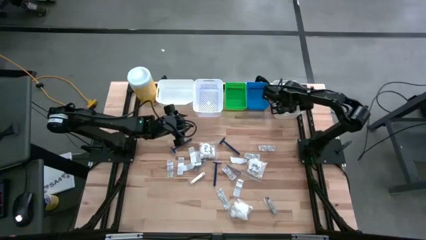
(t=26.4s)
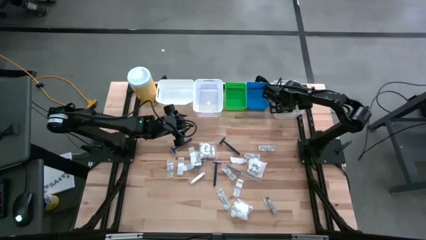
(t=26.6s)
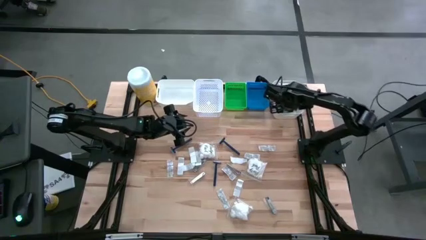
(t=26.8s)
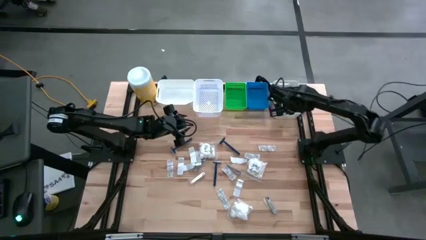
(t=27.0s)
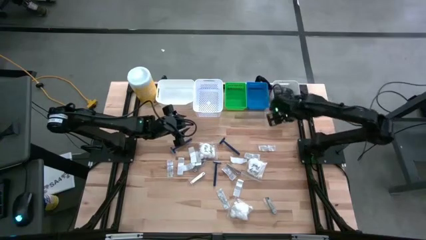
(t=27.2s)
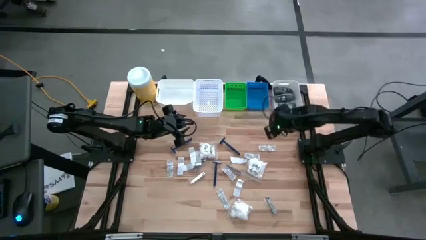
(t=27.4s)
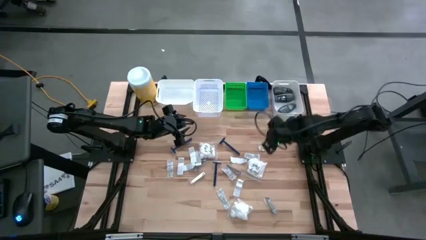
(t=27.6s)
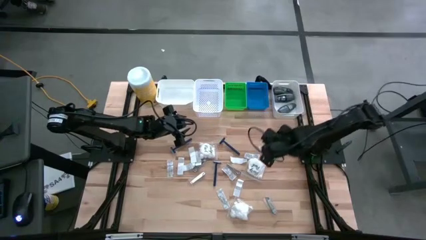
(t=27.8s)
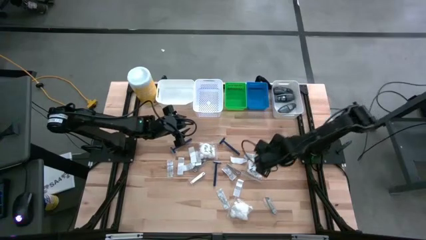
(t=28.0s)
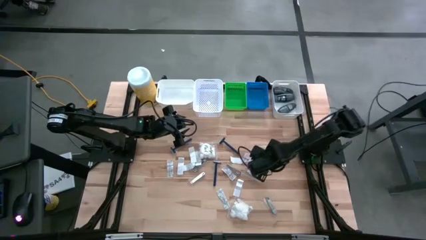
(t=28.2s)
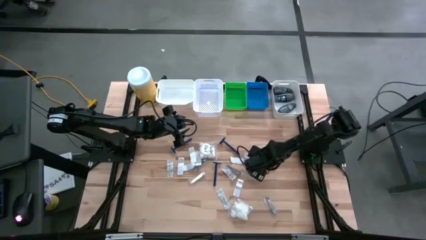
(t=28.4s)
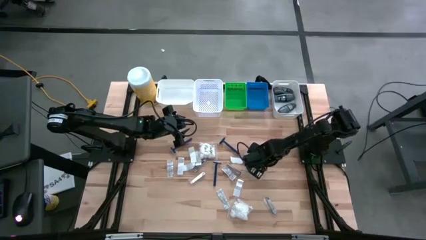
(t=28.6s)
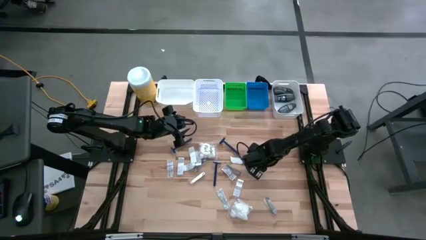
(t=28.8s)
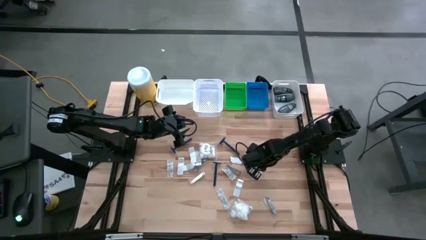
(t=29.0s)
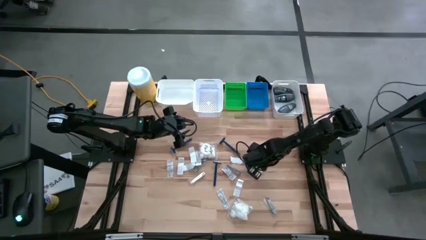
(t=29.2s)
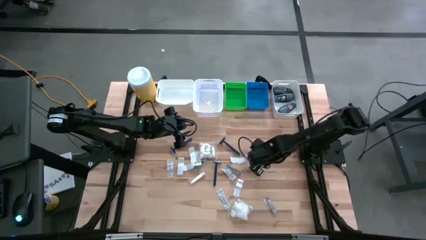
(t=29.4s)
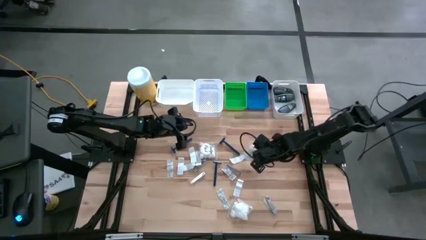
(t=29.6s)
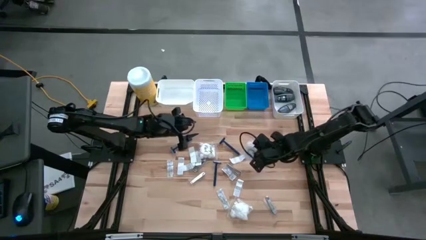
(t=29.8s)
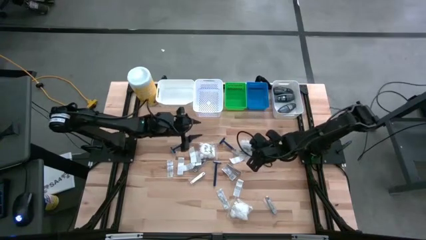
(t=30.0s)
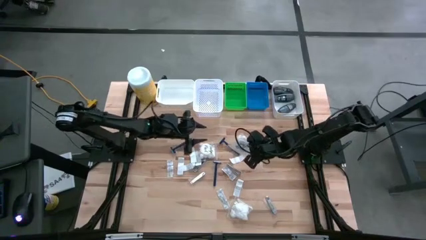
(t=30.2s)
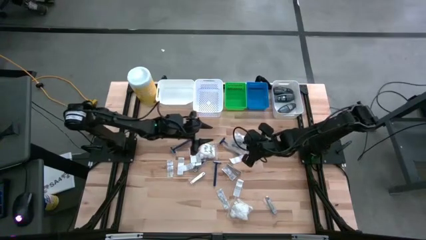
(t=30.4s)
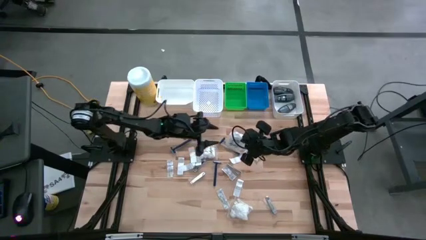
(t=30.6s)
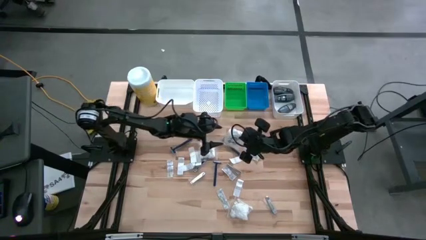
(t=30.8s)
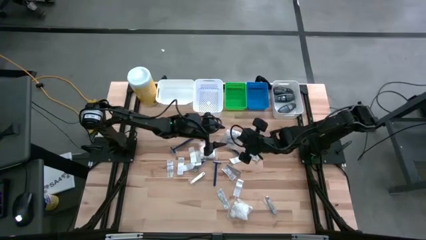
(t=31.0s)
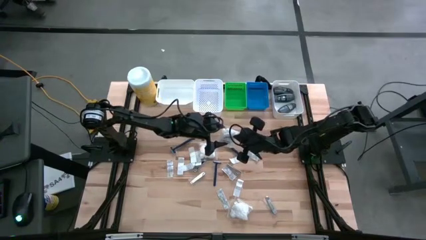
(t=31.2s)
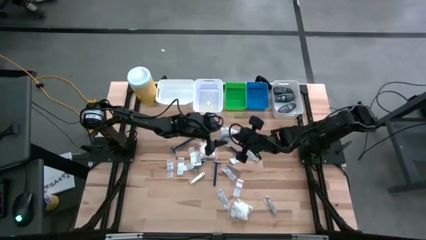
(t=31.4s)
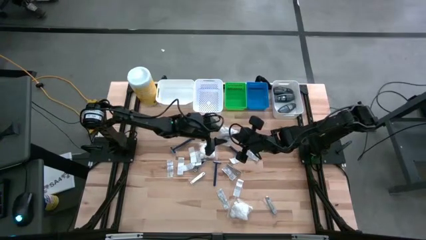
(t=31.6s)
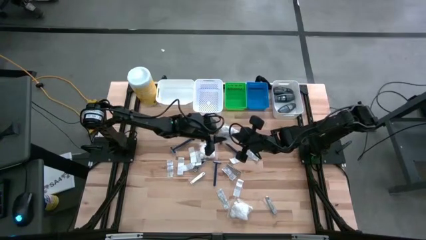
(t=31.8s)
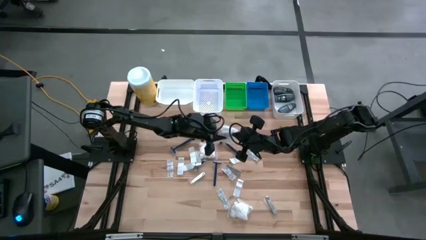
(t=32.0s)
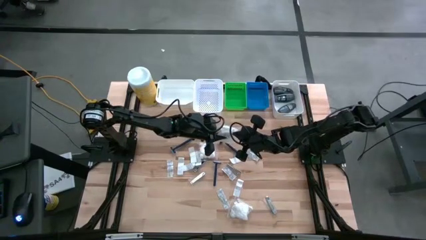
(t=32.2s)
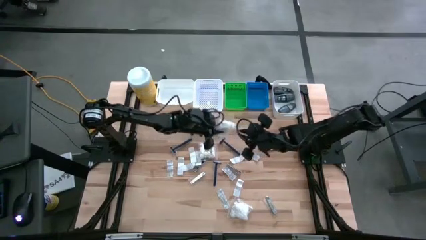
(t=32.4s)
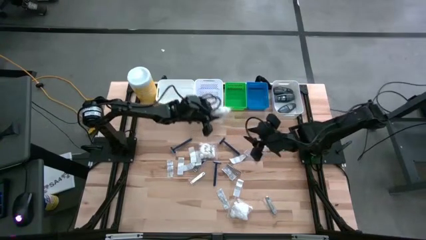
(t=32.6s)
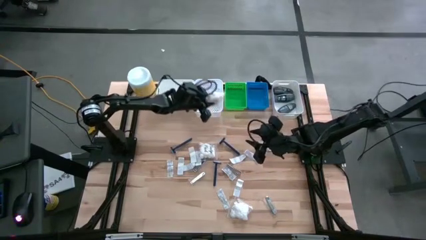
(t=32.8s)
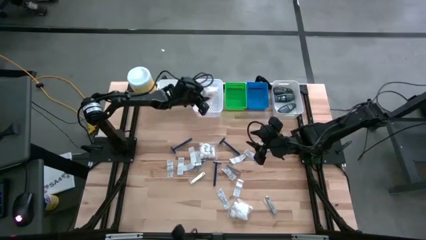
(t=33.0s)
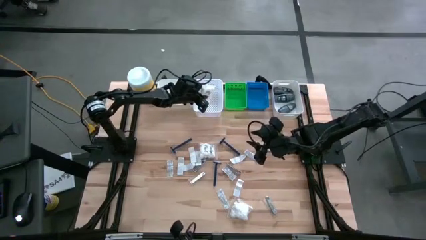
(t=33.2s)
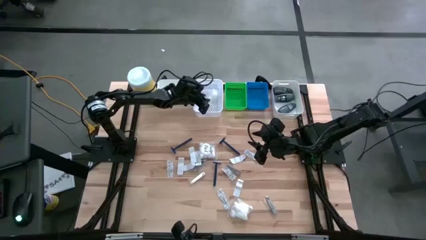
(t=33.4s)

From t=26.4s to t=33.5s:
Task: Pick & Place Travel size toiletries
Put the white cotton pack into the middle white bin

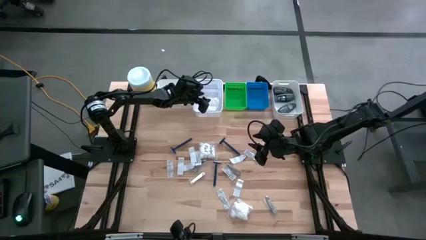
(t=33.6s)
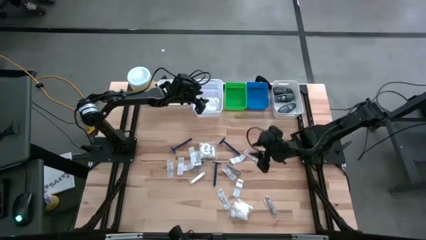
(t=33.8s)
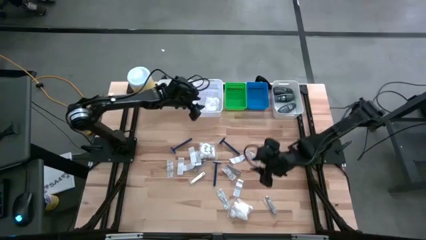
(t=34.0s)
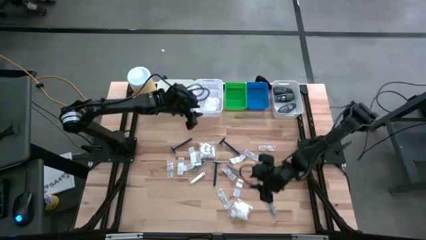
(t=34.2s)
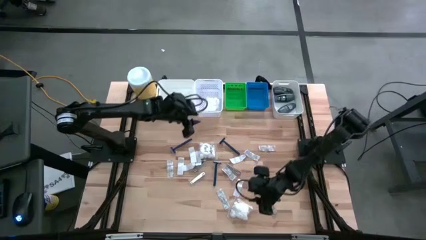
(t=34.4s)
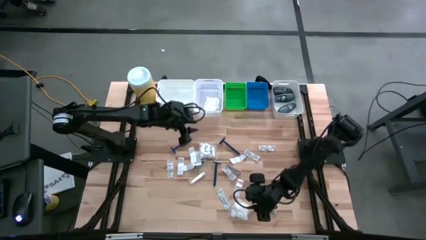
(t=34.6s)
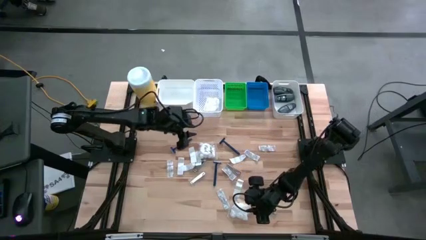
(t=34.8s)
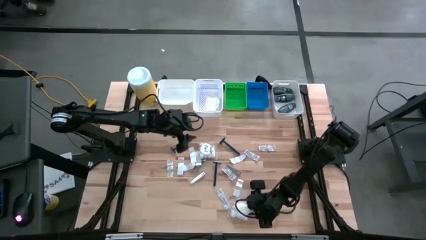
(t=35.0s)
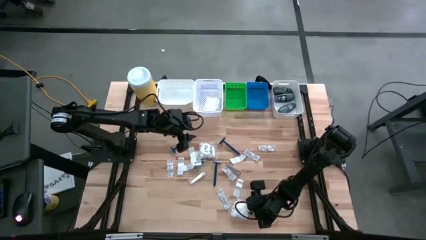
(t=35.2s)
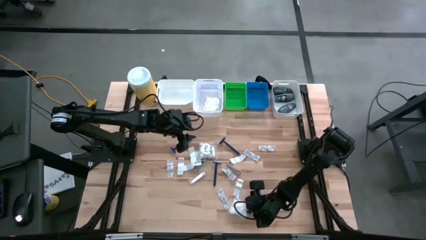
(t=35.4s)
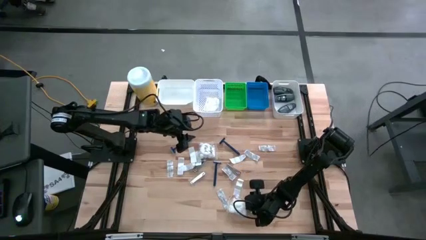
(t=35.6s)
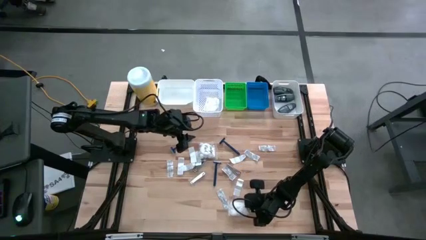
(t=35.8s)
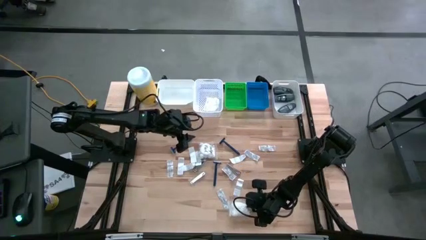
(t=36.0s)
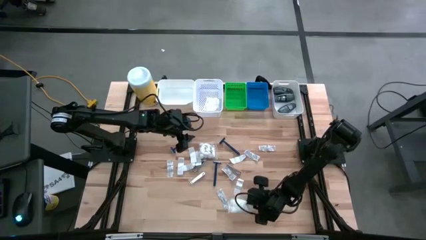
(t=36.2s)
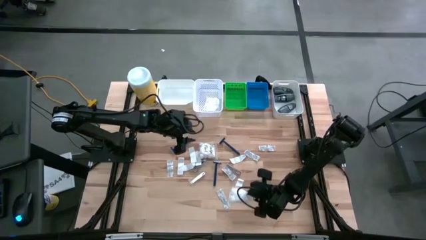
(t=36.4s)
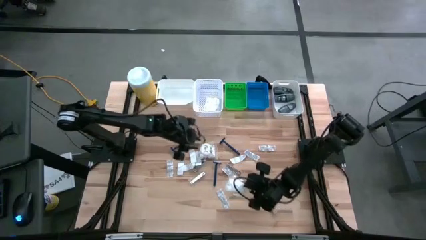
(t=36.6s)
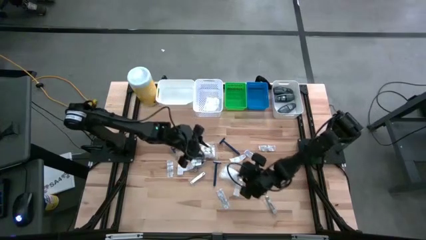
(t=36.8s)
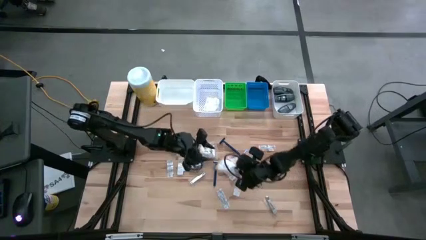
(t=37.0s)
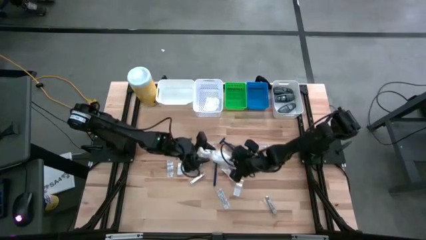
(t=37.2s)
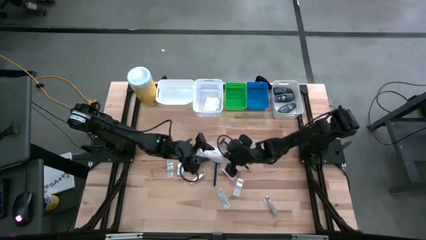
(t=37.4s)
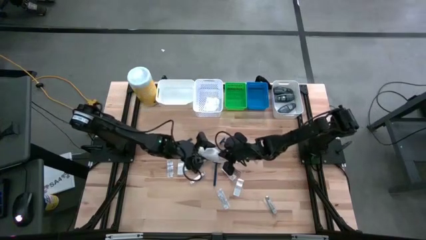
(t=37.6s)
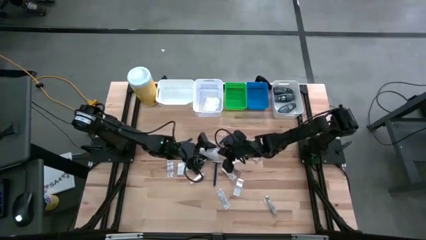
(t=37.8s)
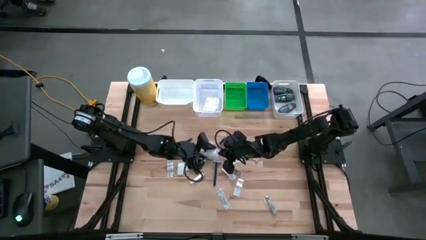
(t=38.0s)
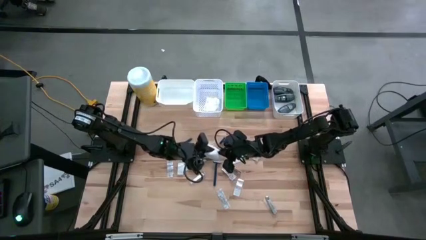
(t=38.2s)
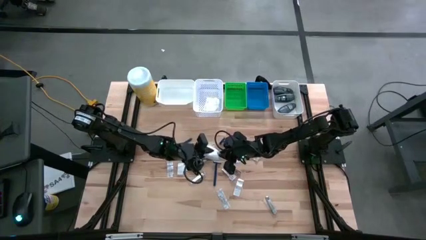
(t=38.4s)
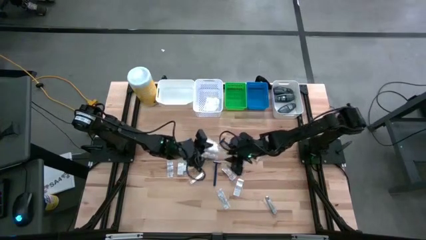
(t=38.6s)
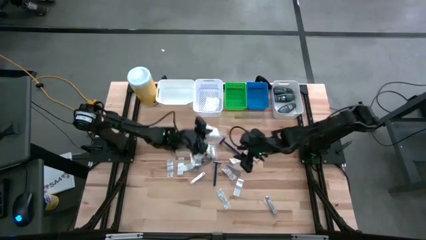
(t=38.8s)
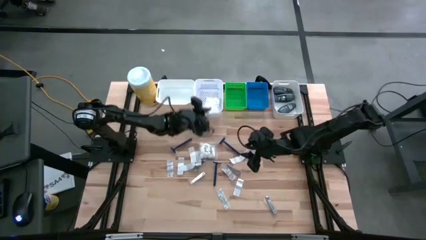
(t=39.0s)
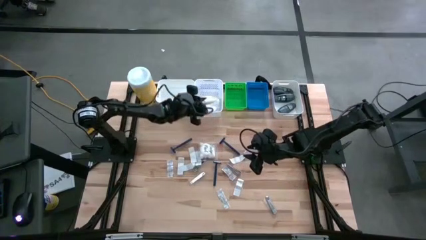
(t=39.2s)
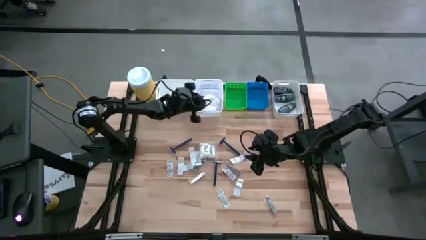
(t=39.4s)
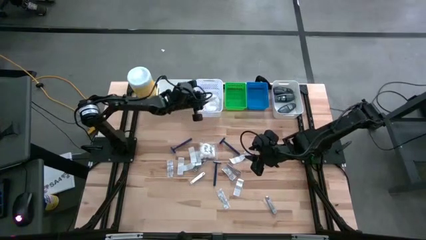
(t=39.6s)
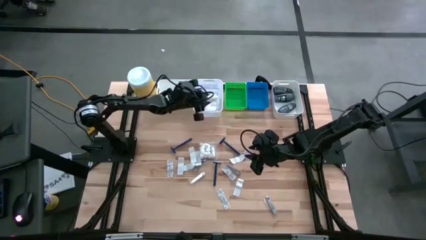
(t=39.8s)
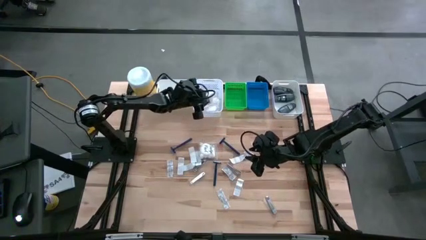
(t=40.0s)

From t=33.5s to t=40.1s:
Put the white cotton pack into the middle white bin

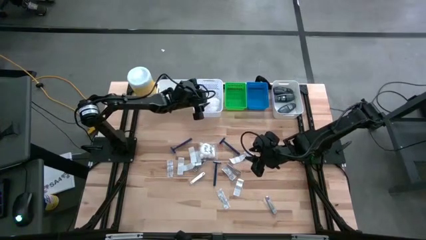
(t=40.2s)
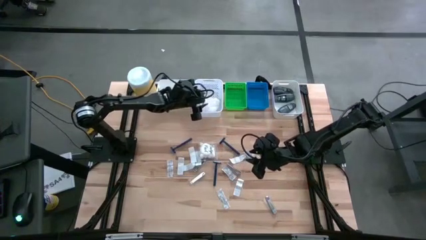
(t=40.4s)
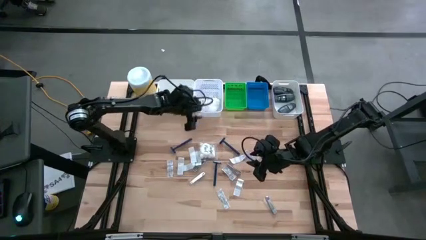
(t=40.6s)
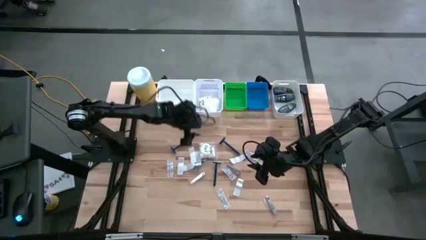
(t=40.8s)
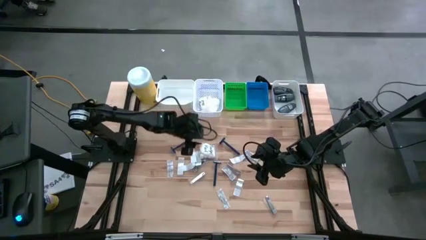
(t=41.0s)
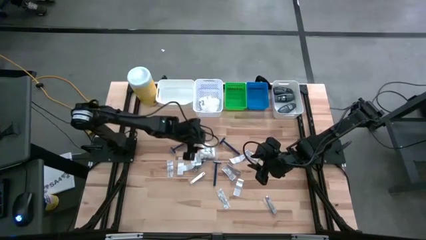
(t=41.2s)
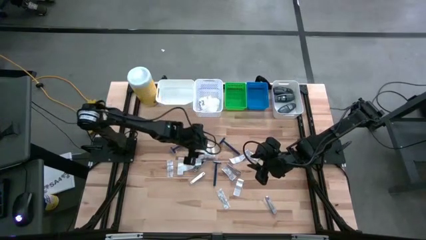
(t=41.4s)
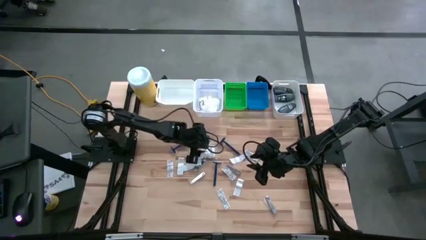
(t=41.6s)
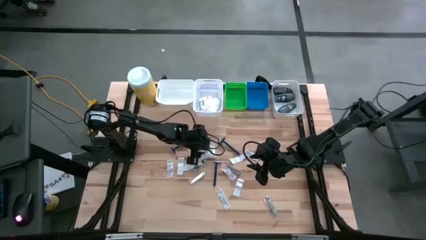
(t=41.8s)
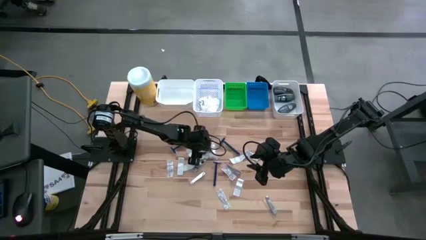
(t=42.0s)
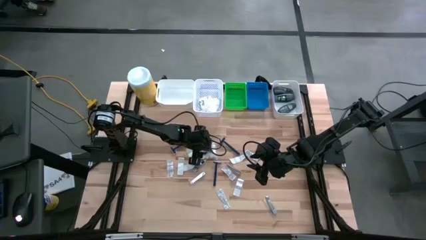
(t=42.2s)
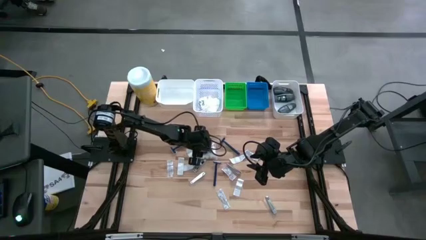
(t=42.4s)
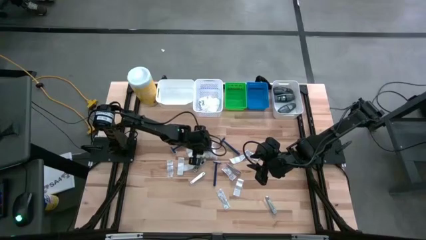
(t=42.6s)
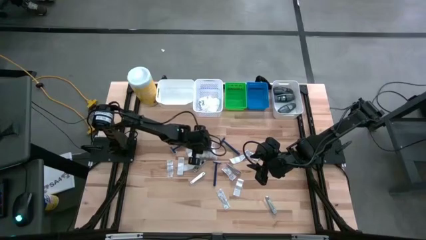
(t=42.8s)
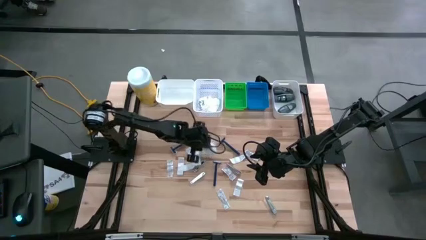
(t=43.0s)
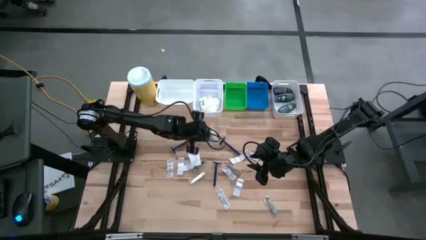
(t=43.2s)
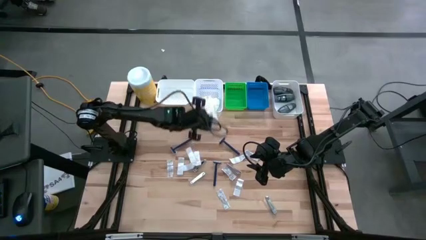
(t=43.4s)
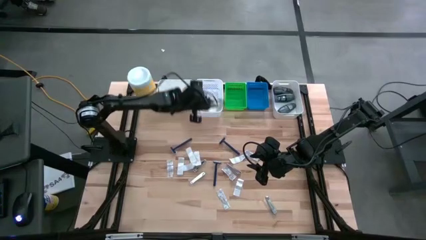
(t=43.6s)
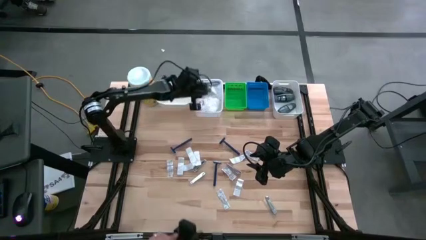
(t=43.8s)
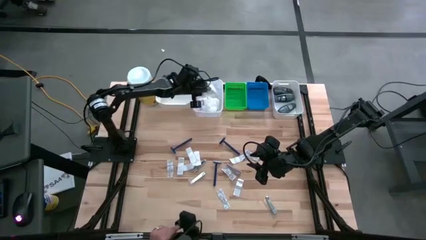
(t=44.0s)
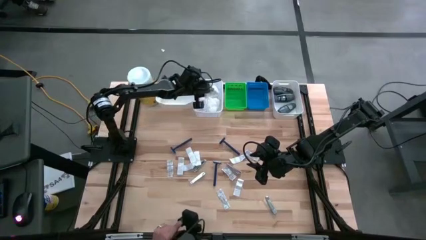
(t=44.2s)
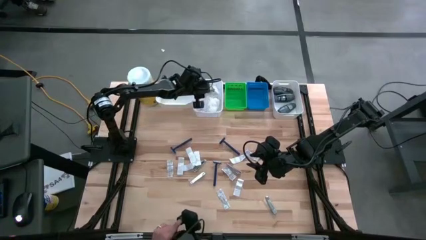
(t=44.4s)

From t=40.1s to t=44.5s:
Put the white cotton pack into the middle white bin
